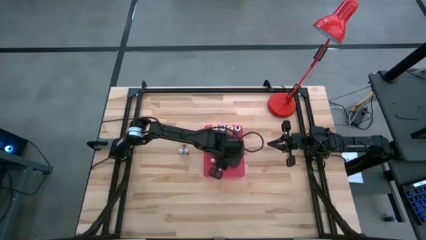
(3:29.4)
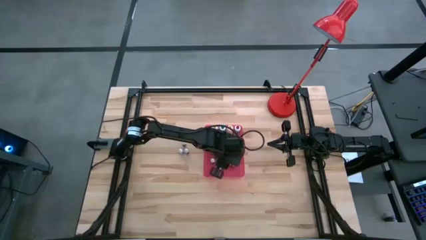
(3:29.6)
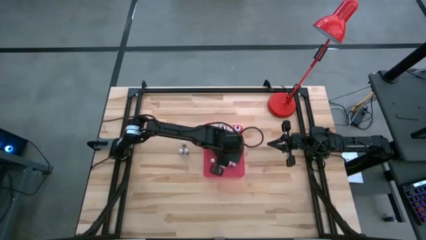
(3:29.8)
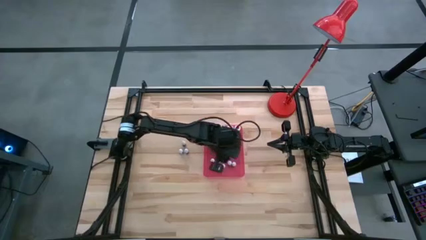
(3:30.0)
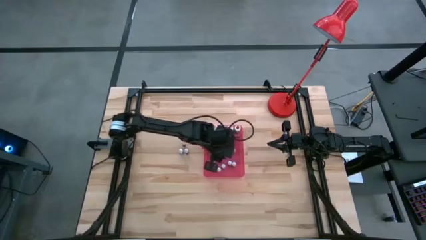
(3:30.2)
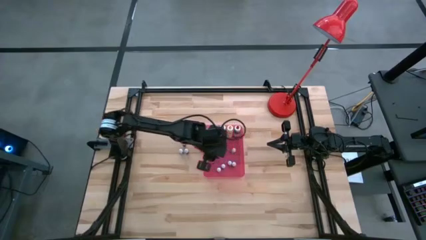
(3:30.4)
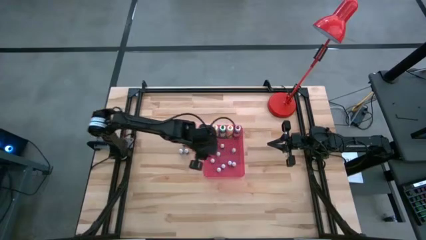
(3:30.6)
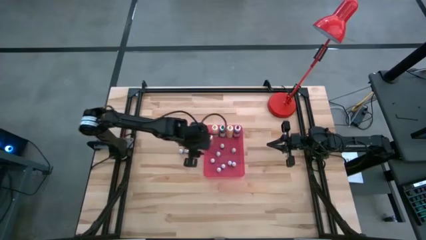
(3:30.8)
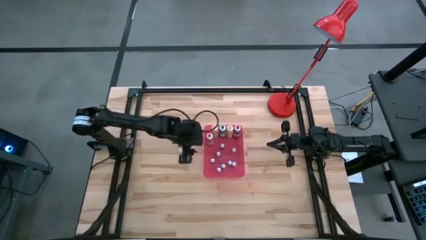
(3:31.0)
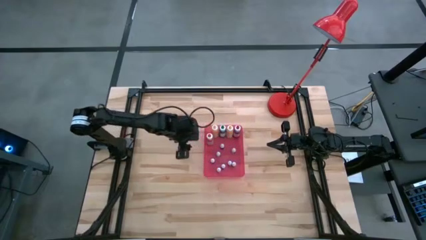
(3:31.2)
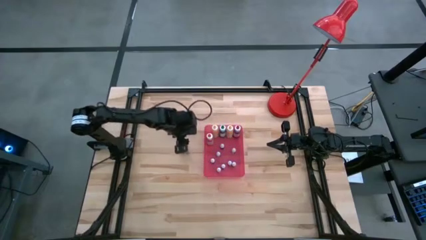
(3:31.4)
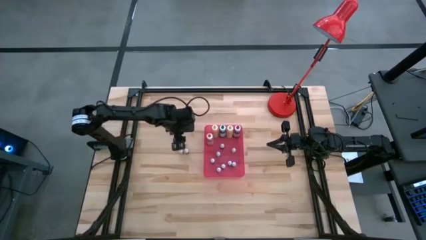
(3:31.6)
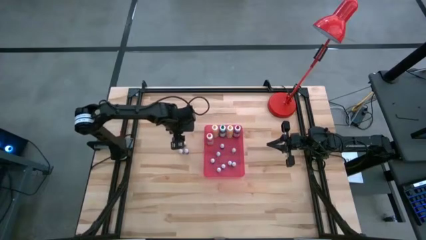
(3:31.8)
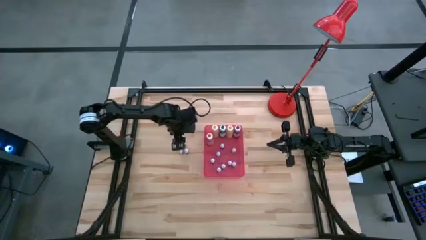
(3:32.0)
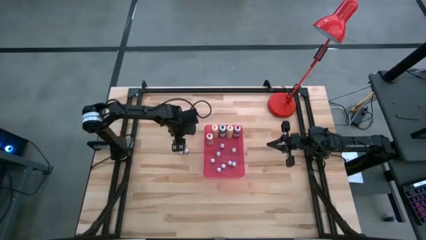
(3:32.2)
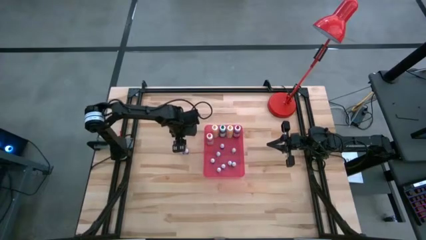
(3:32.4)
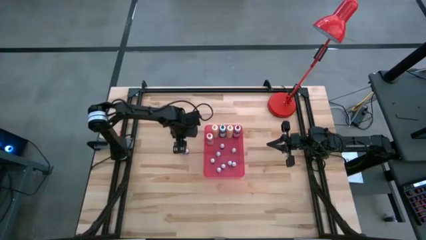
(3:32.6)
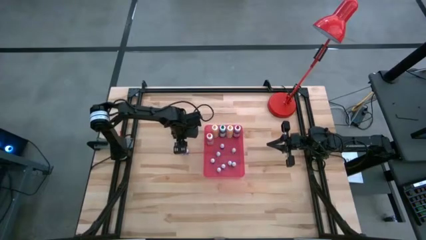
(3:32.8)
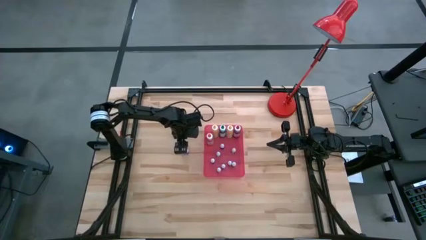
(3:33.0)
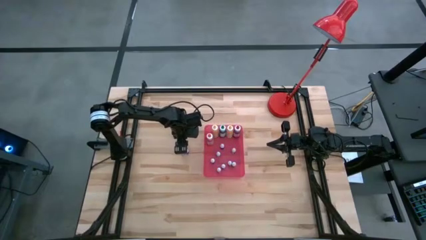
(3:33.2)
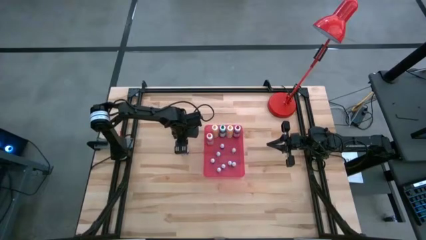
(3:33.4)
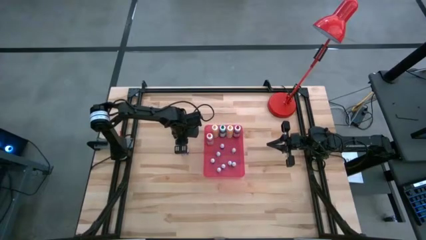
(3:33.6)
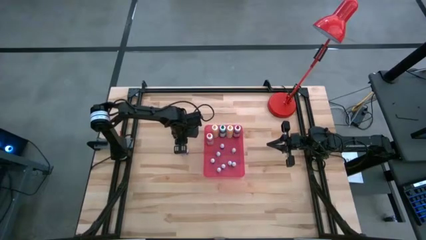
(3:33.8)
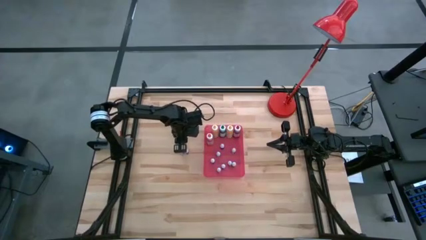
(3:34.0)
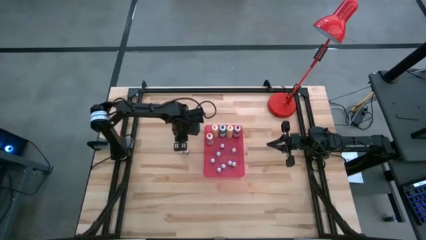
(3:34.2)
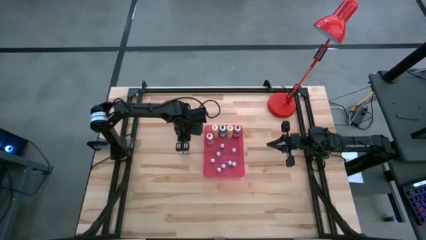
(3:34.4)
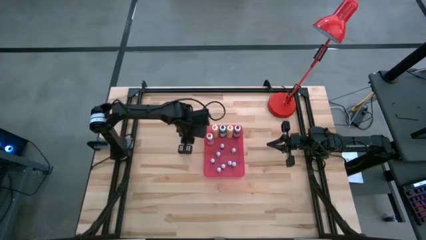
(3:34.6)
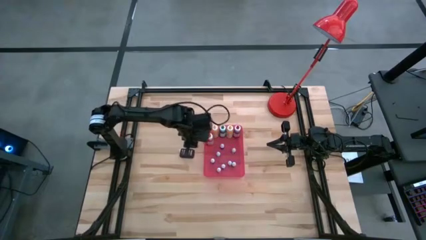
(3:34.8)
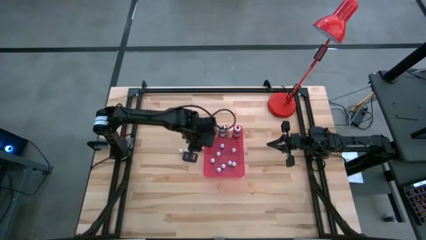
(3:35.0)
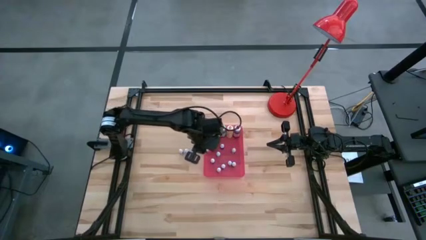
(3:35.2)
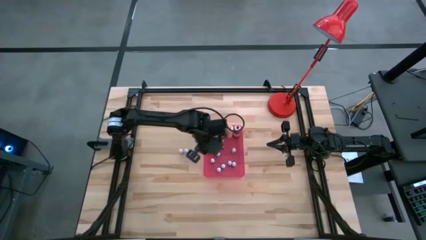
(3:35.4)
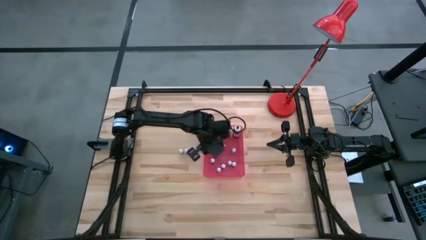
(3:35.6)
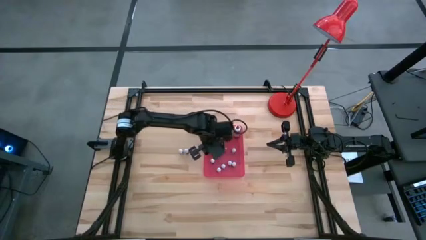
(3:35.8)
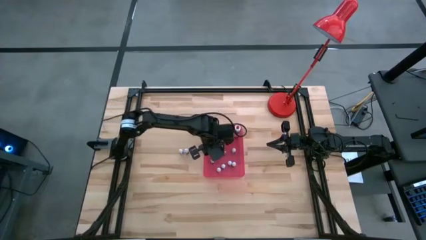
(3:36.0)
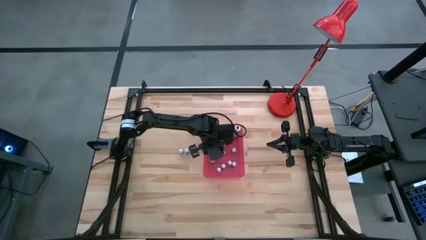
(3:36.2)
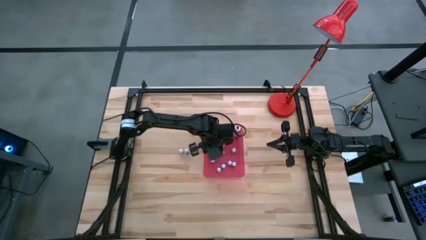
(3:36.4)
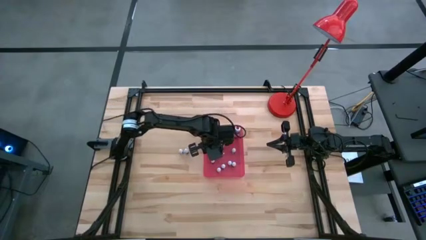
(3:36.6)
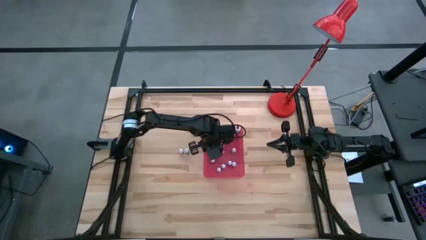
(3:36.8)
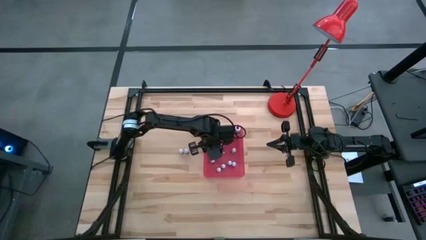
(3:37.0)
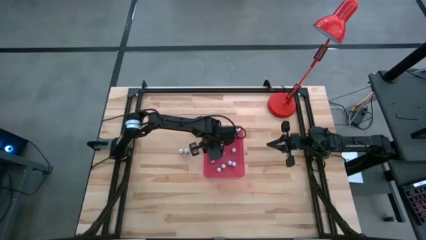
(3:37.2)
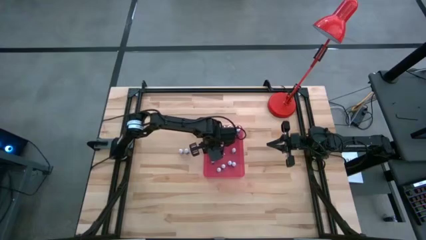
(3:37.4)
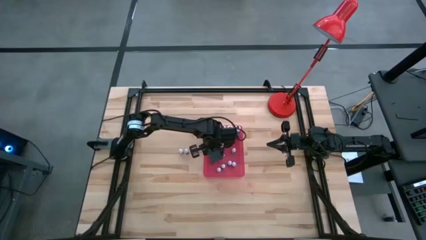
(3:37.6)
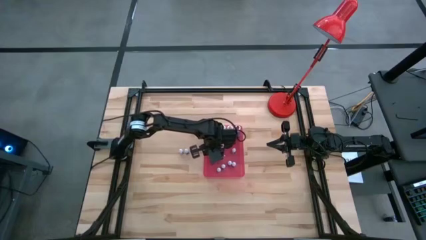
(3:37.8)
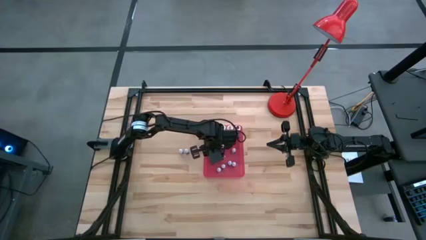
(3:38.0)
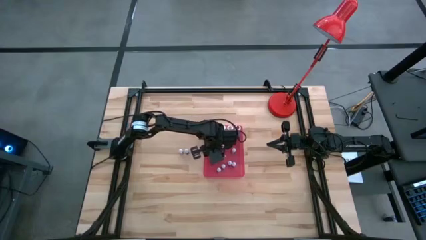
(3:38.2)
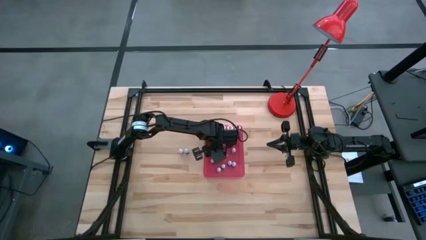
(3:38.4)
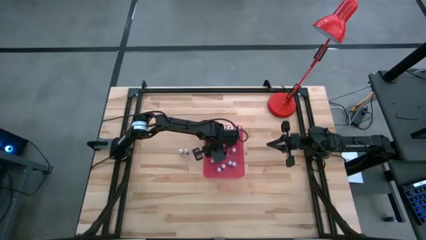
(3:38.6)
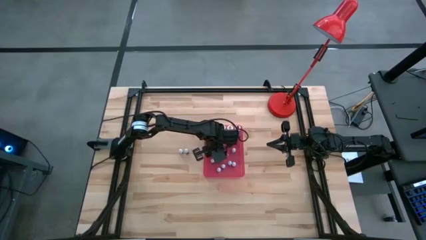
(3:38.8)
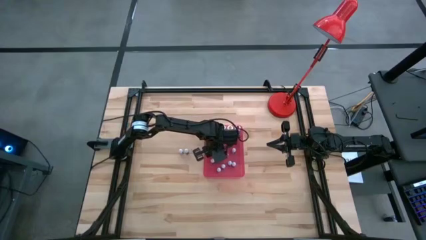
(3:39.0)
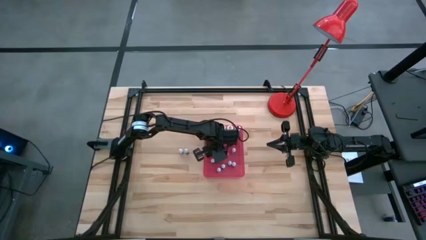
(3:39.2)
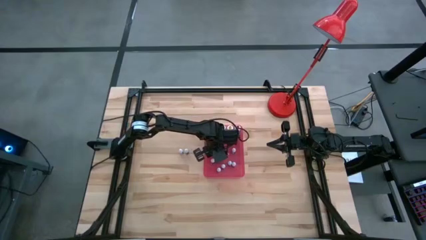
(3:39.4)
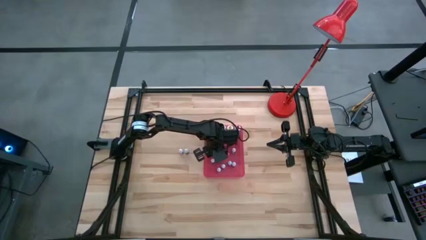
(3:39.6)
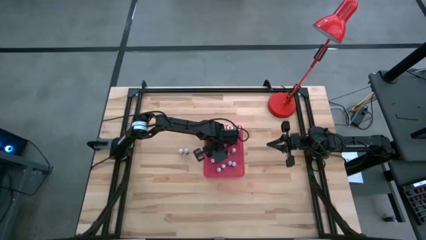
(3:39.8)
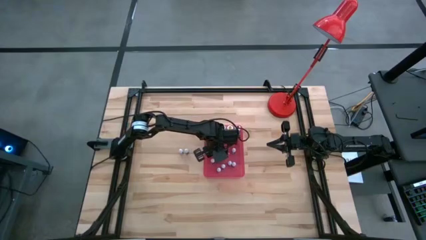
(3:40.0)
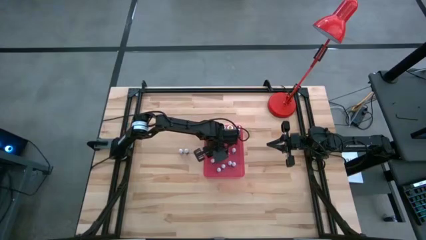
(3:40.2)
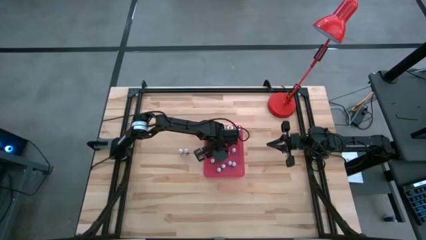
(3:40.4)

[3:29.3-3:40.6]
Task: Pick & Place food coloring
Put the small food coloring bottle into the red bin

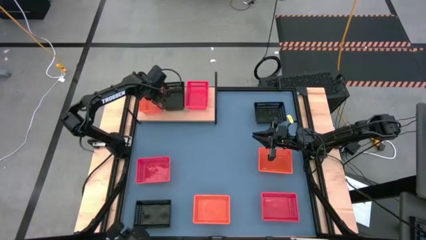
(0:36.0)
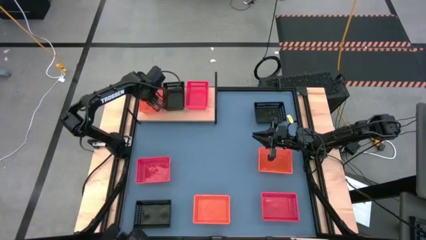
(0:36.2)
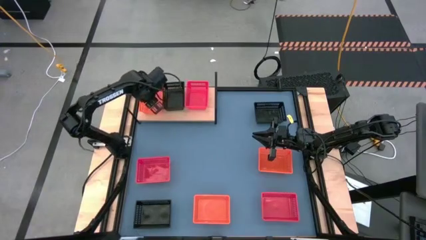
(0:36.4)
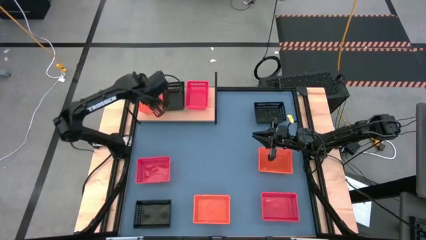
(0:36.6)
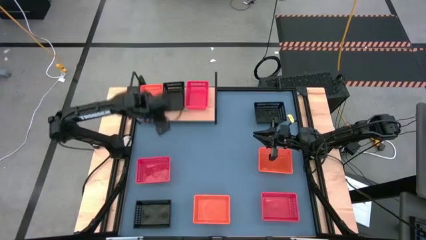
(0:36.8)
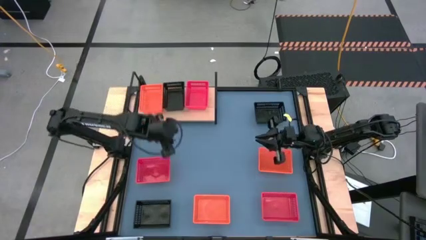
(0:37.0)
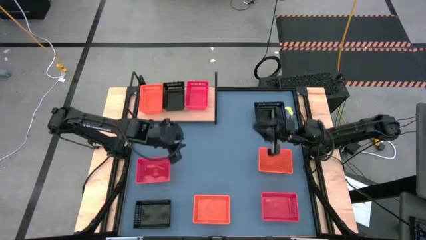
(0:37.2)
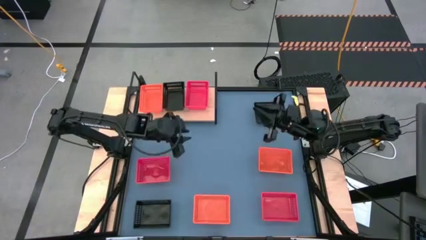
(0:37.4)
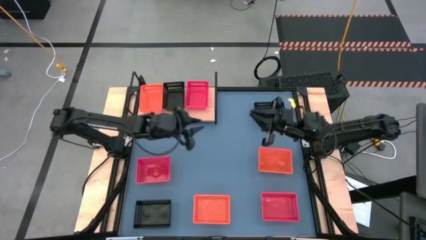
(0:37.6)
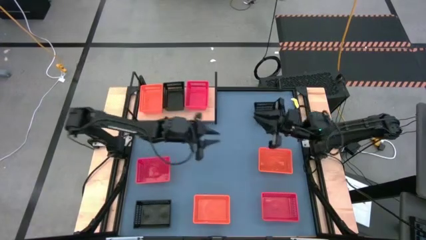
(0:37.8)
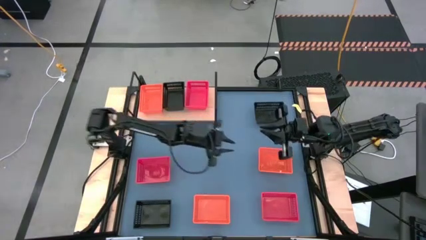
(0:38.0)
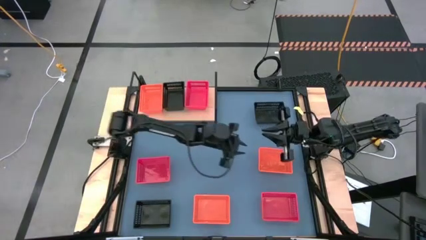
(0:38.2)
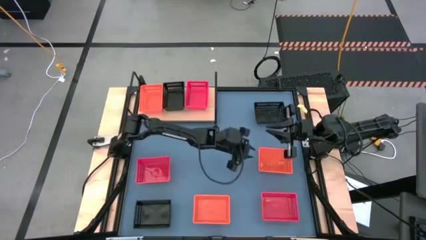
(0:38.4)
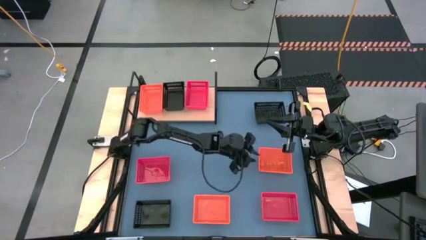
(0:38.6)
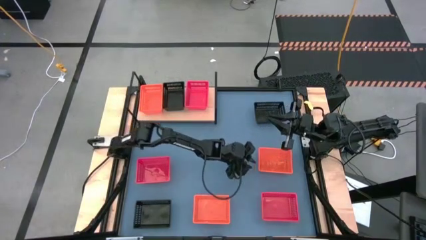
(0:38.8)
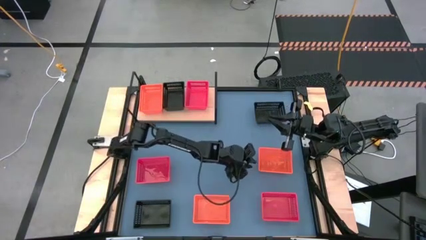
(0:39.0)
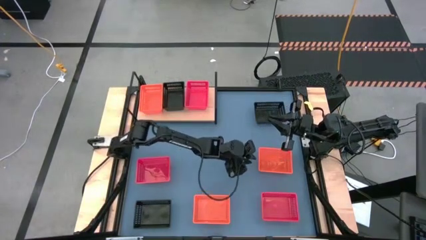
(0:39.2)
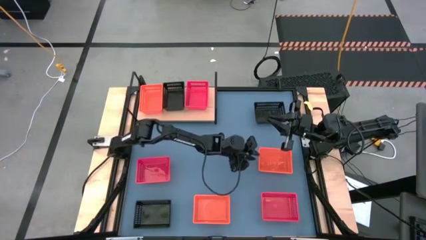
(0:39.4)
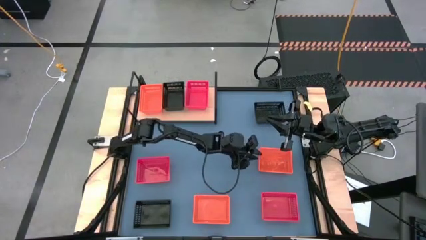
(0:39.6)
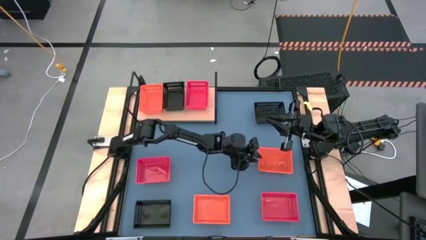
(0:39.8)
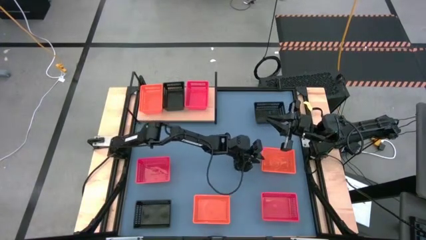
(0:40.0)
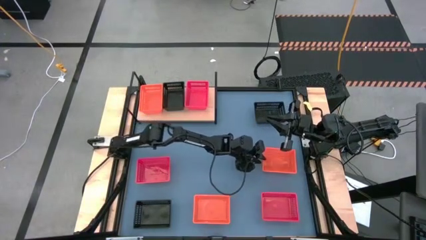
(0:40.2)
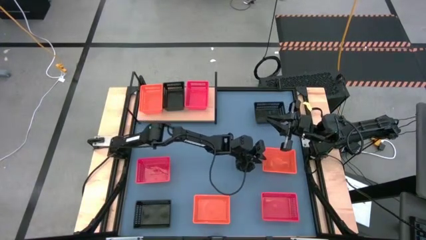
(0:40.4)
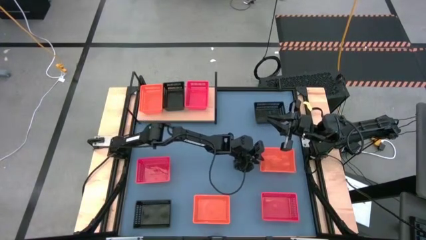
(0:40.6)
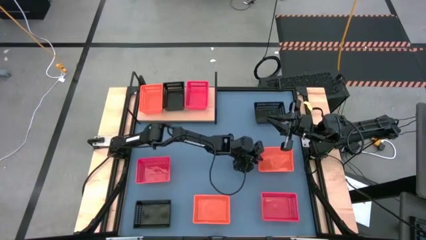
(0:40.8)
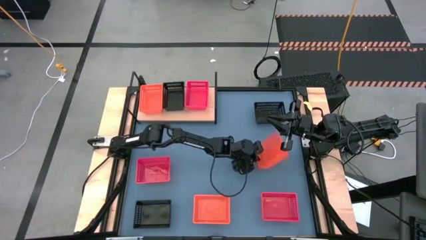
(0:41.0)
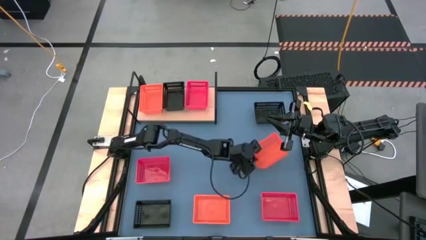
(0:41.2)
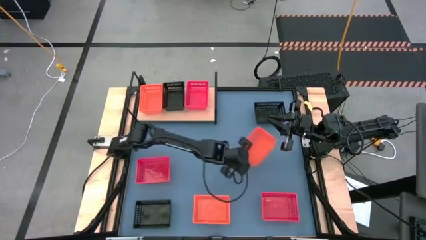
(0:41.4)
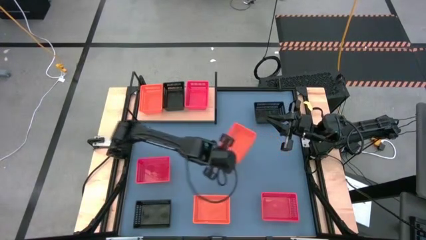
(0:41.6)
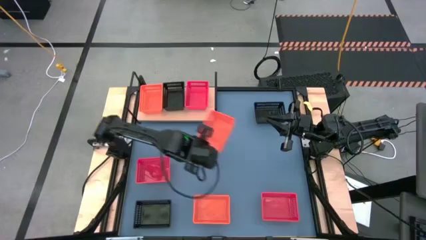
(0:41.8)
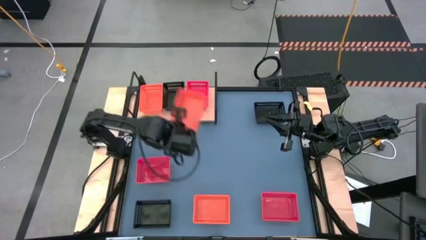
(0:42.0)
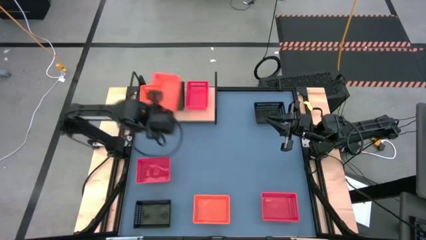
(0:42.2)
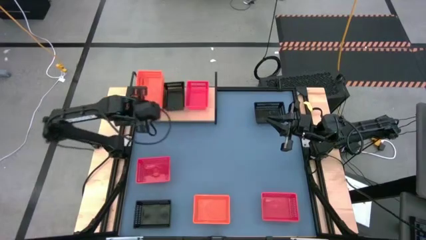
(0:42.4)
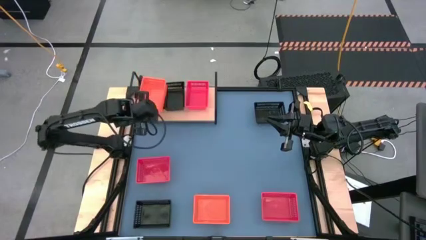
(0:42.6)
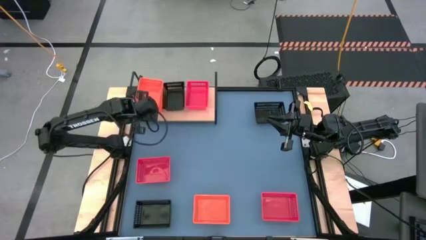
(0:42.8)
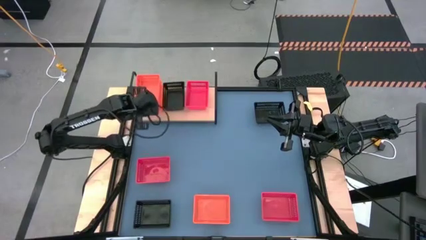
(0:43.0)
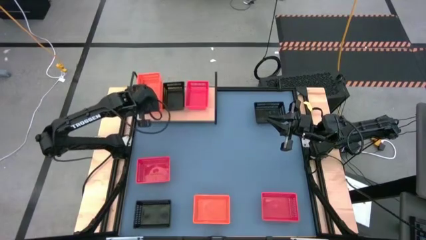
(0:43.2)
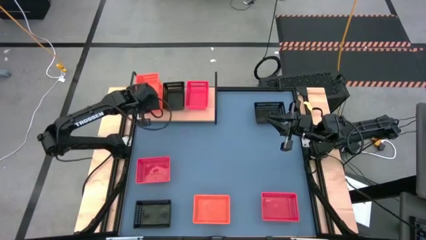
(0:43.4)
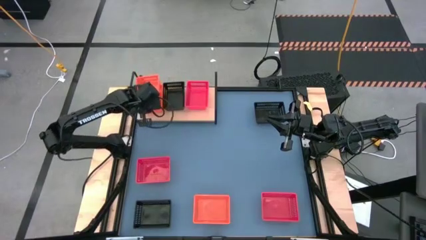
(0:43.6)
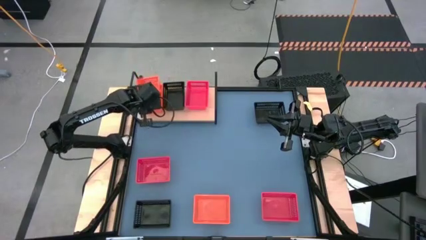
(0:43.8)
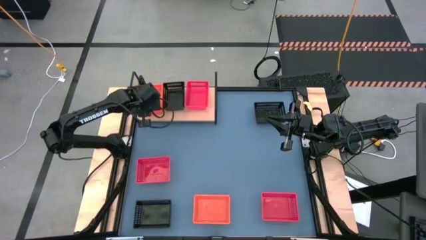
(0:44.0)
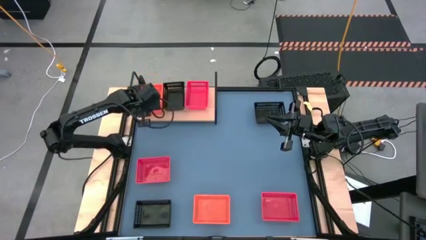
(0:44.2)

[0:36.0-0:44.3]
Task: Stack baskets on shelf by color
Stack the right orange bin on top of the other orange bin on the shelf
